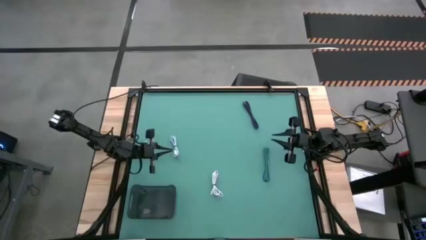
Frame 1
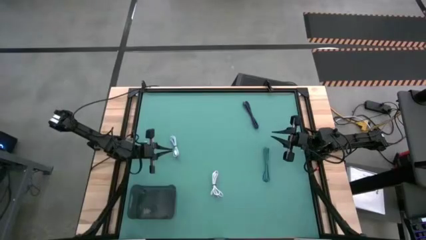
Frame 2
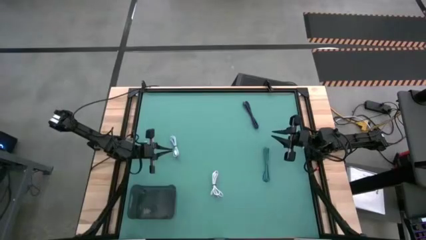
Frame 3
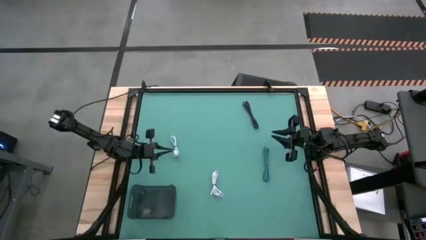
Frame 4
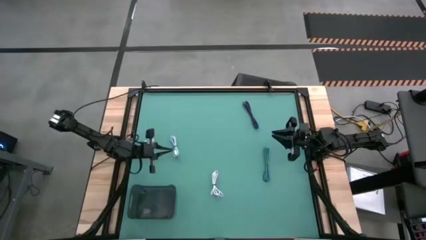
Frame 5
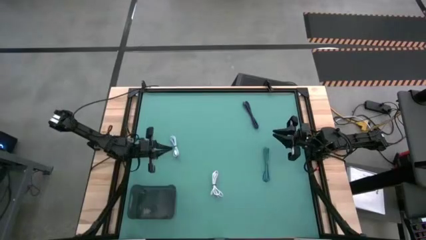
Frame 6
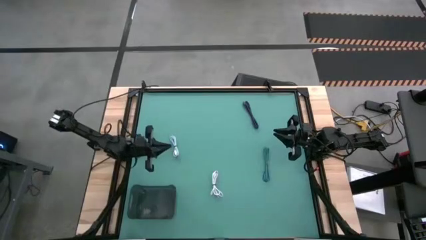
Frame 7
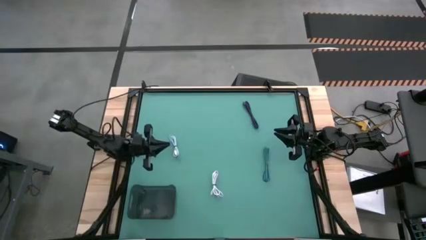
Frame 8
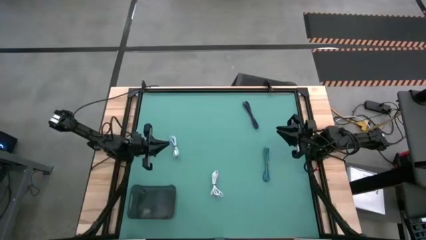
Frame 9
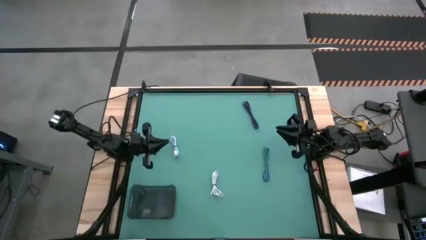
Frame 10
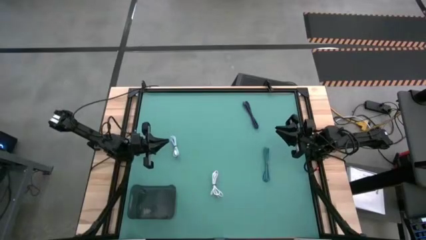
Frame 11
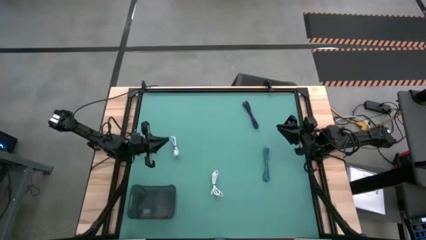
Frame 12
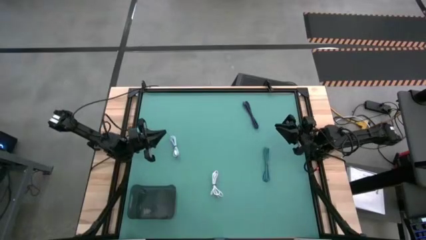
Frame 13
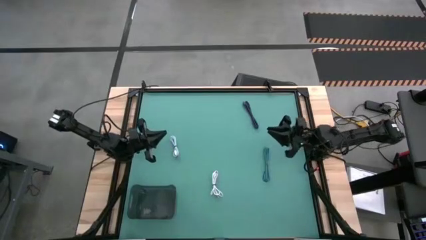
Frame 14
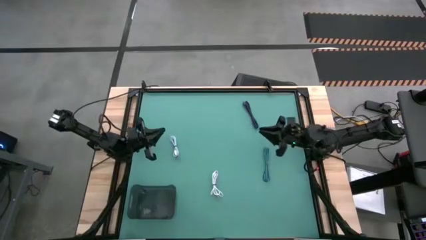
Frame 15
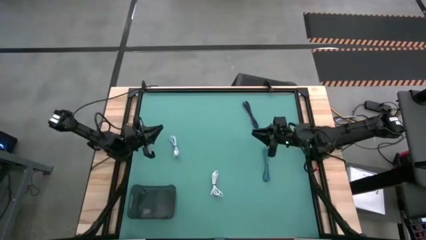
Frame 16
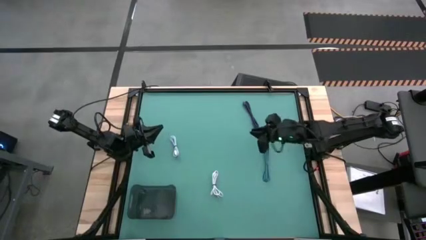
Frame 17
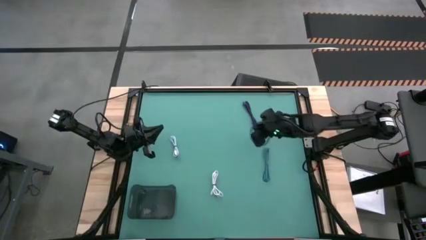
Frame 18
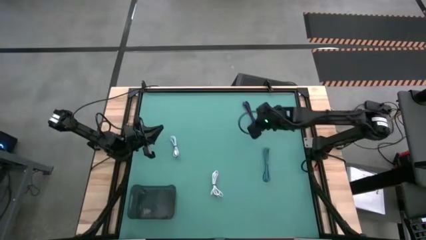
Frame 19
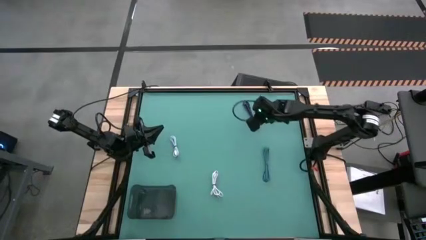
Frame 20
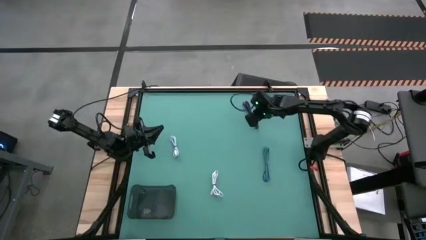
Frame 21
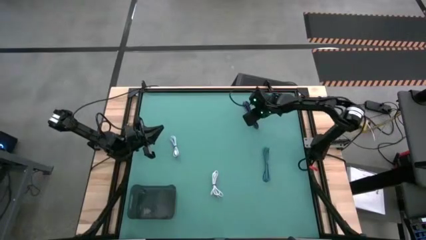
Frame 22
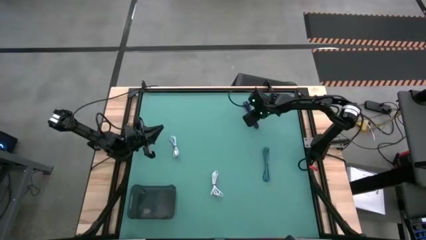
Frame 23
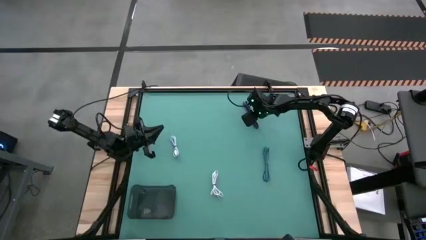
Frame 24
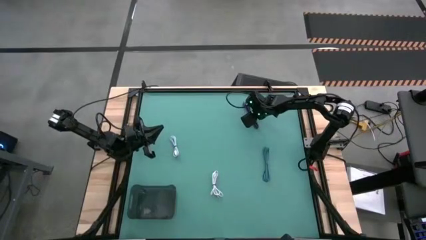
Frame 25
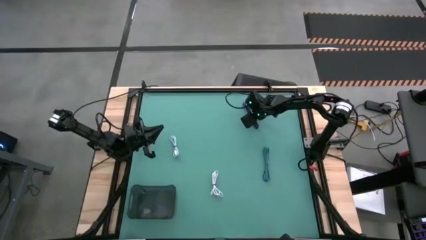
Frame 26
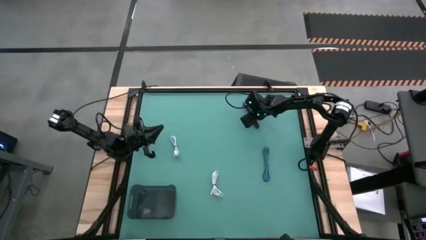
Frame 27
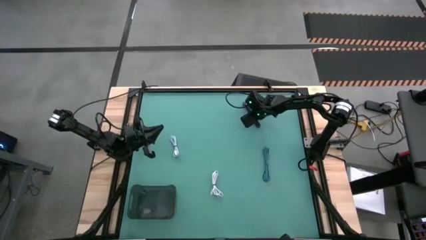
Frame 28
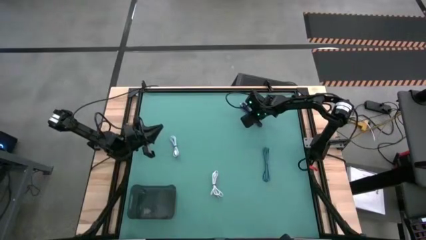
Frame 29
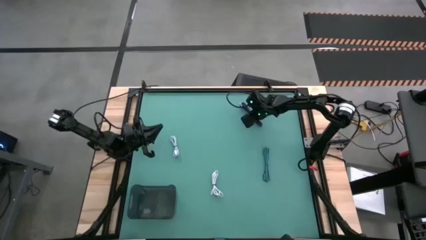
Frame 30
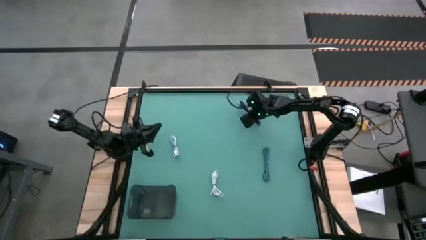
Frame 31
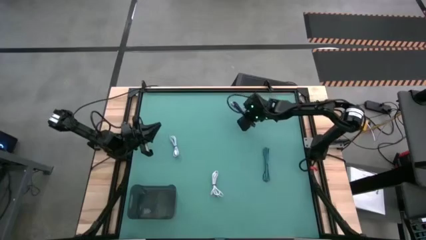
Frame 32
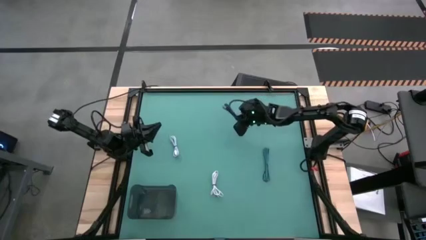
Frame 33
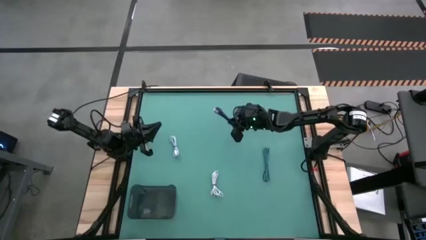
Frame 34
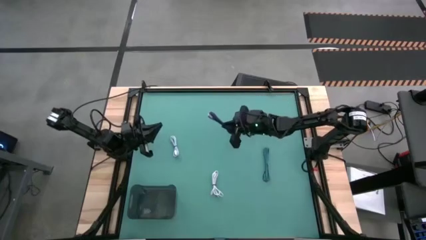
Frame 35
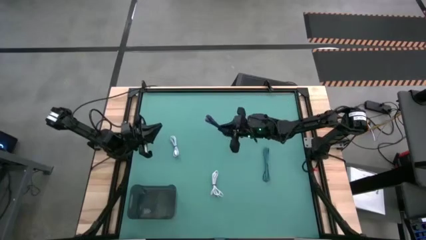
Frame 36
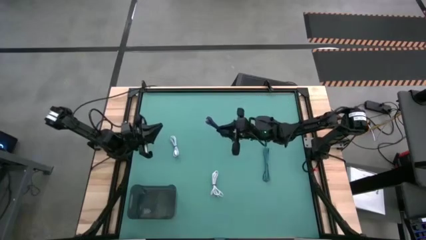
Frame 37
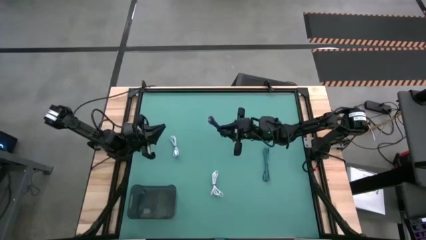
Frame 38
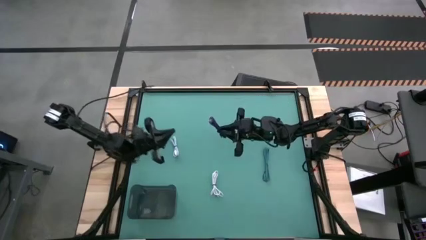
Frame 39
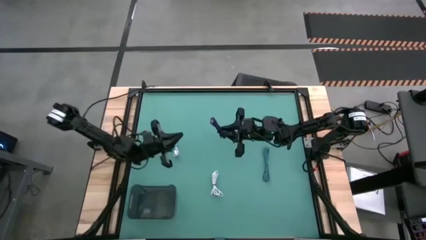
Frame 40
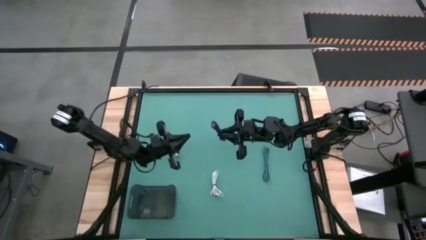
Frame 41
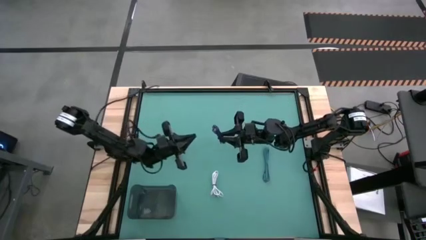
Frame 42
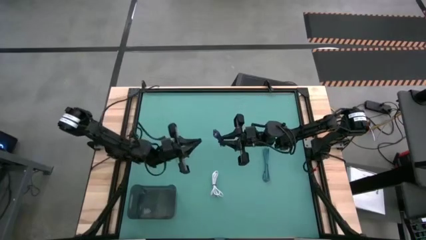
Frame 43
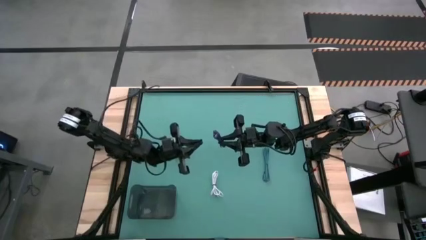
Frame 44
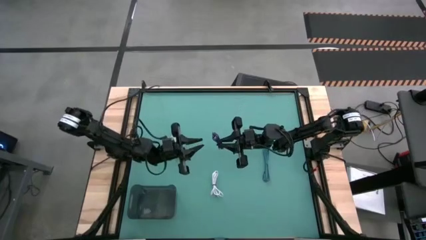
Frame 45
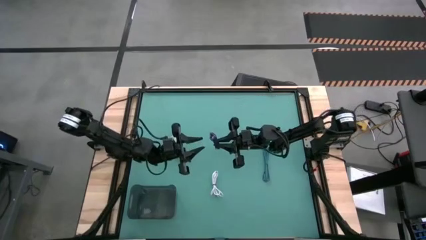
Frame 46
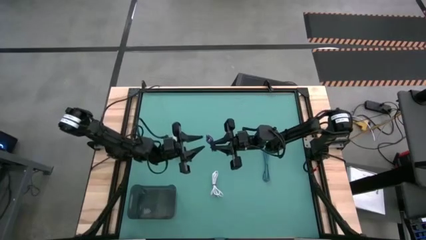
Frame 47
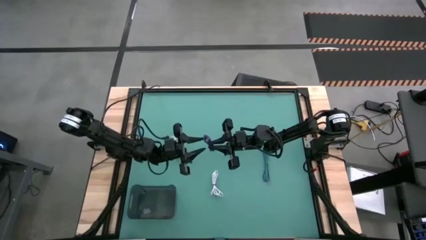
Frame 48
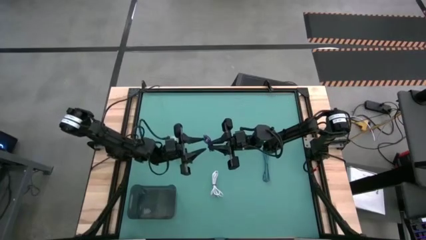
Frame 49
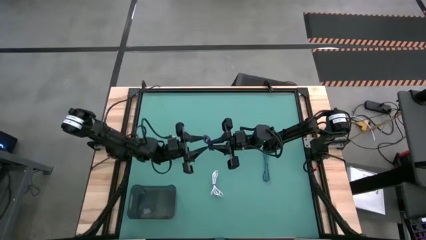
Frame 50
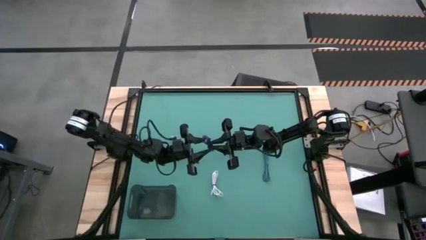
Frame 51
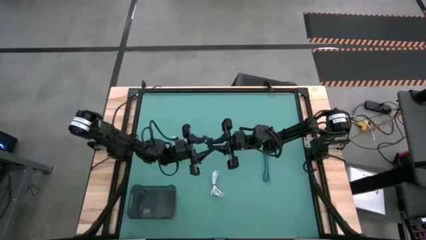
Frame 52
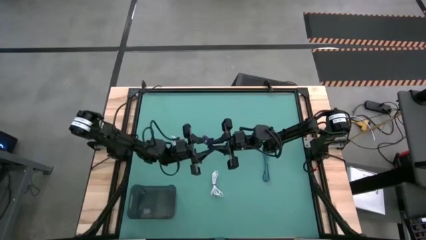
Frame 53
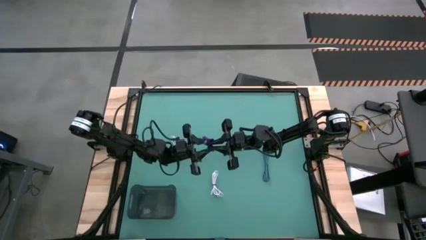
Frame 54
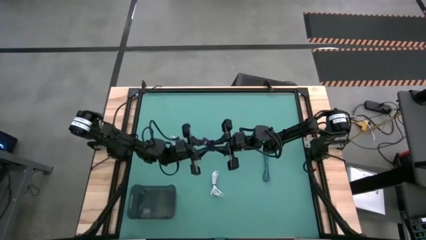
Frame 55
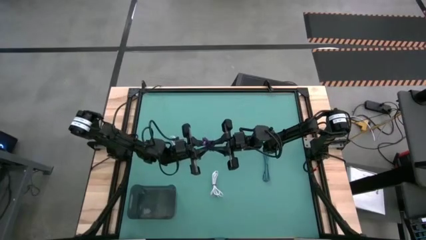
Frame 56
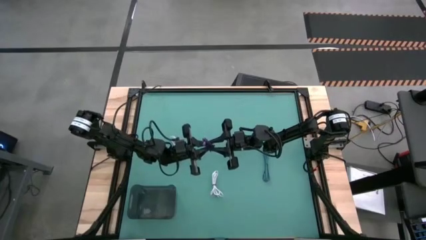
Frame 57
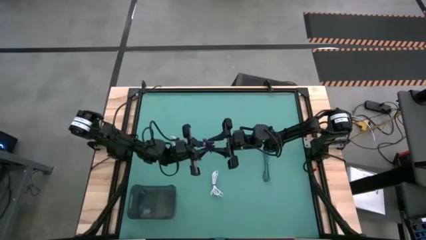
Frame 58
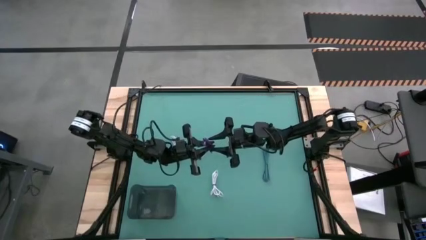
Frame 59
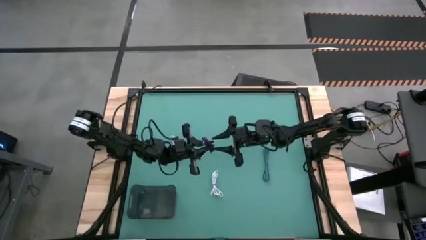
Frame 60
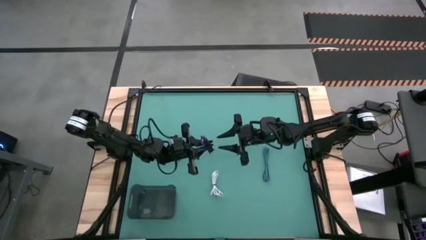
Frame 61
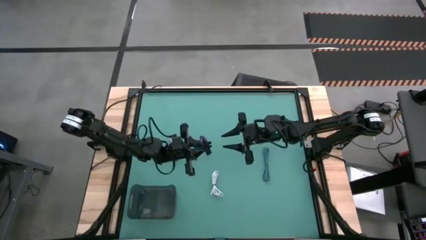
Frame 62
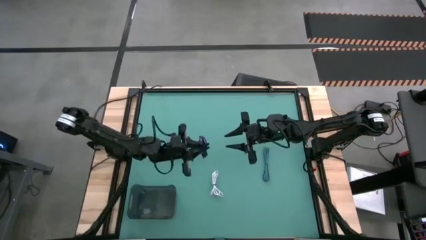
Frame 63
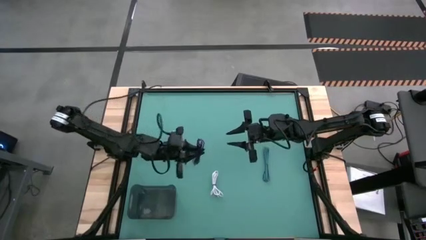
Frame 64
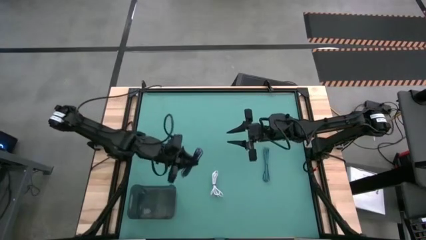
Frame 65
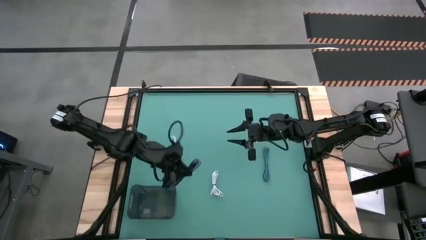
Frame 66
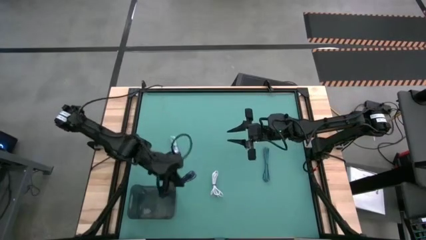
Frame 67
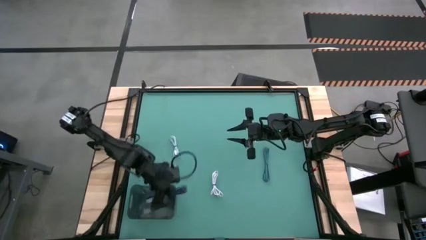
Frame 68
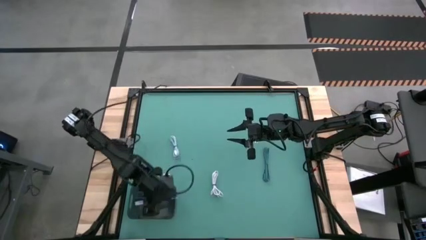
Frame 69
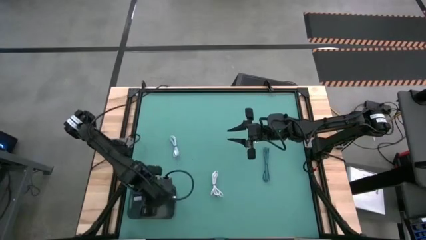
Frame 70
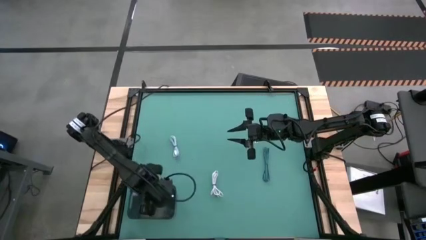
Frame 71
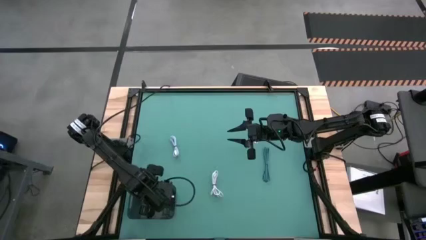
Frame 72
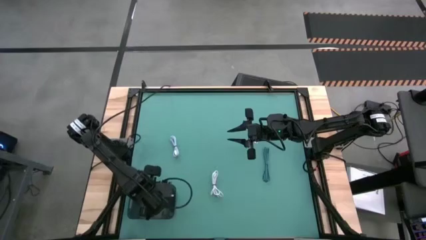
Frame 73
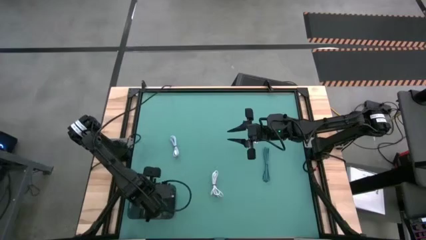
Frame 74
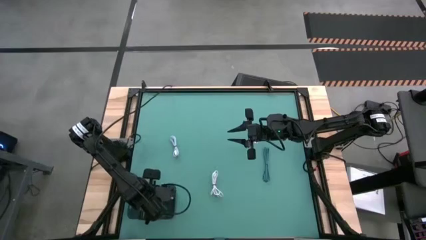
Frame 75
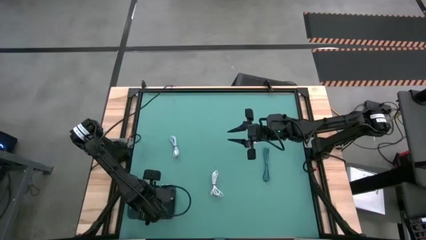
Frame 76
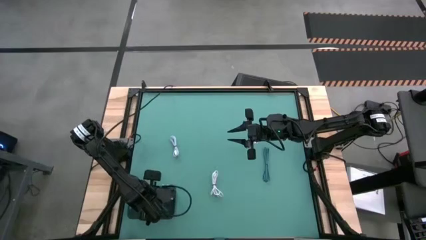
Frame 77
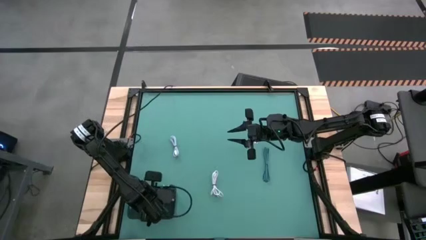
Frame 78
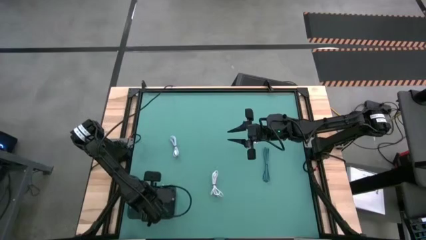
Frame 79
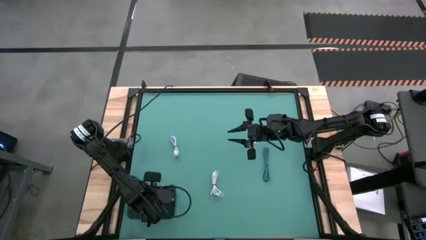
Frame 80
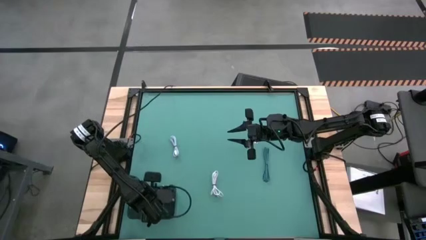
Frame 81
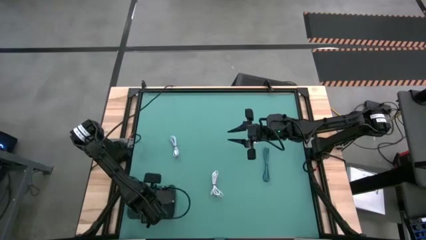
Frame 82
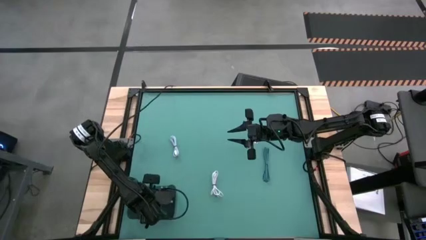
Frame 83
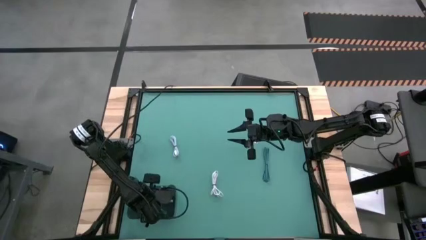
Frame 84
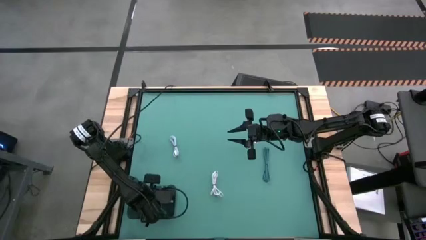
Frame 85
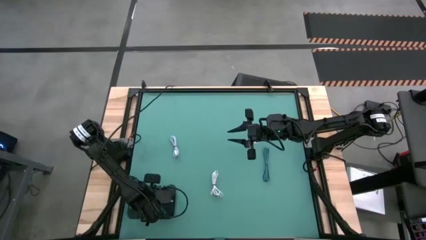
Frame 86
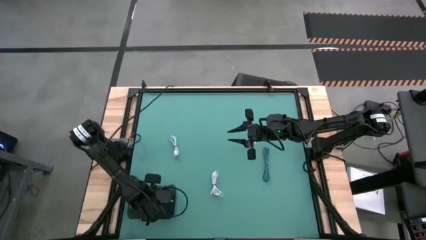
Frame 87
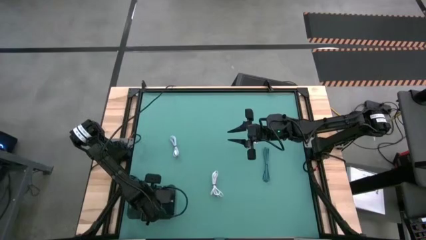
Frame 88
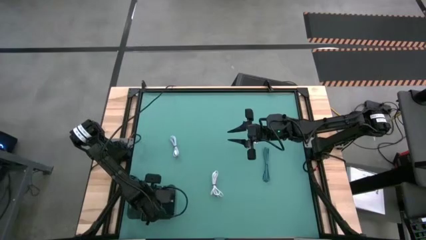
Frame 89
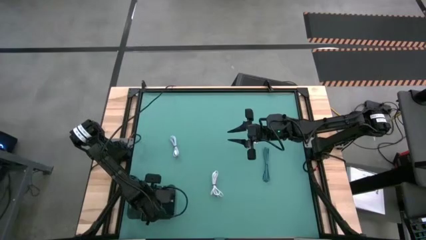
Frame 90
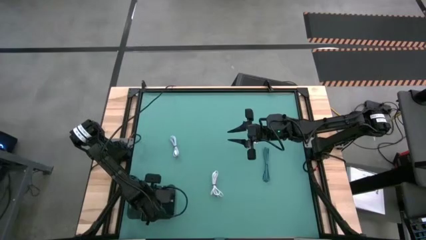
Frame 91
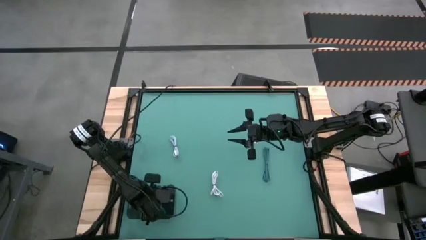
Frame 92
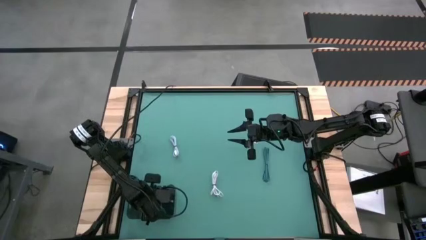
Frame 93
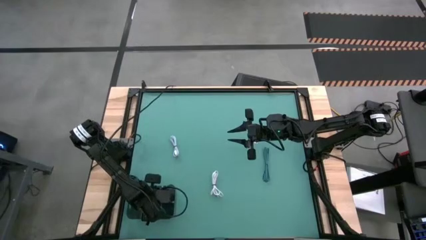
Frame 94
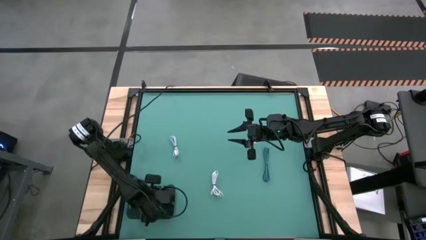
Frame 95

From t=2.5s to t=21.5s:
Task: Pick and place USB-C Cables
Put the purple black charger cable into the black bin
